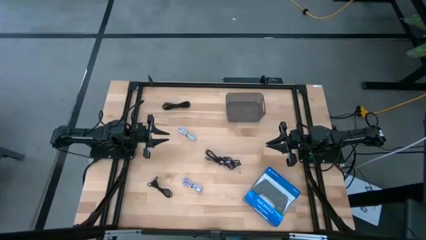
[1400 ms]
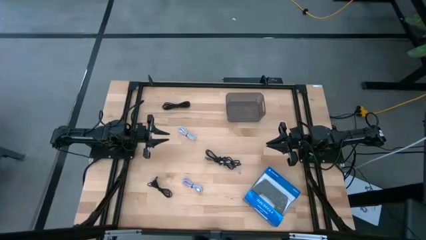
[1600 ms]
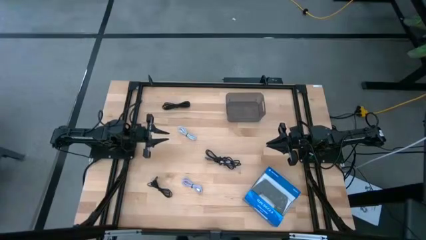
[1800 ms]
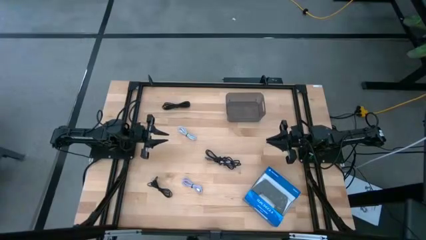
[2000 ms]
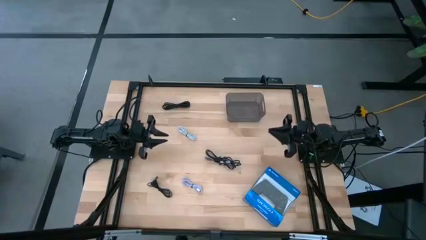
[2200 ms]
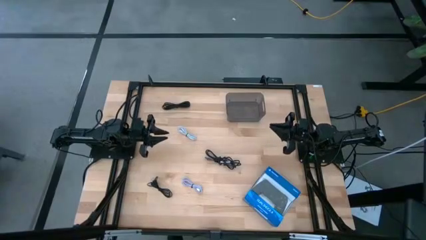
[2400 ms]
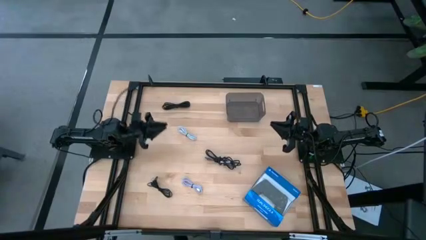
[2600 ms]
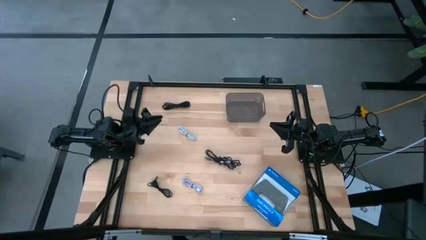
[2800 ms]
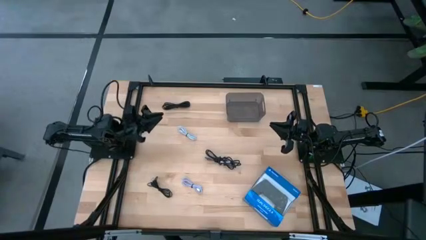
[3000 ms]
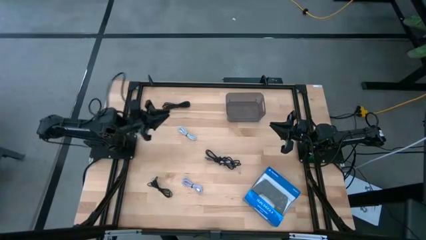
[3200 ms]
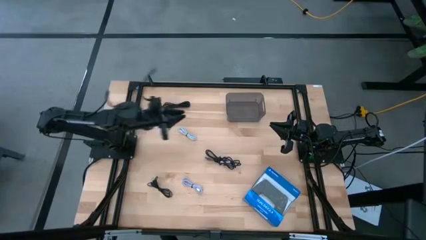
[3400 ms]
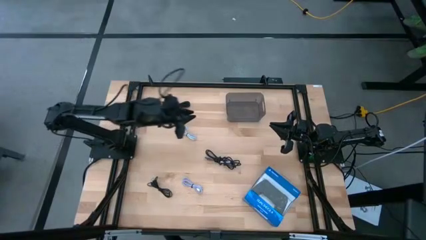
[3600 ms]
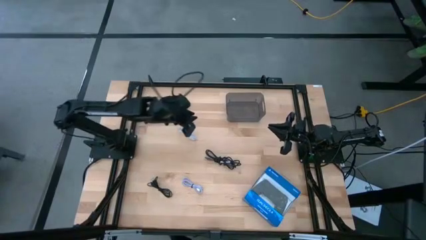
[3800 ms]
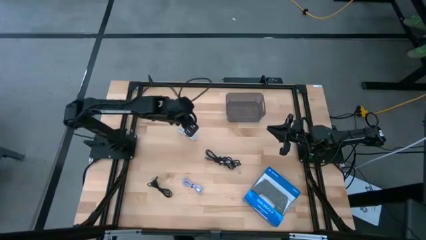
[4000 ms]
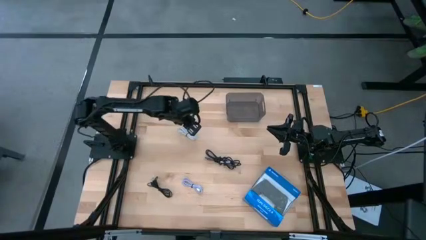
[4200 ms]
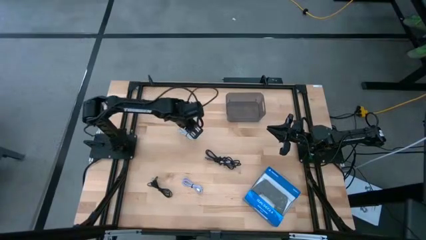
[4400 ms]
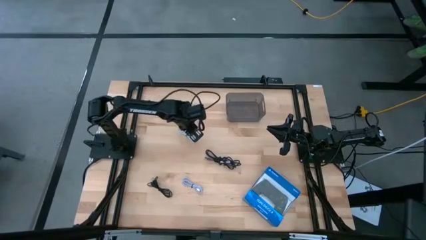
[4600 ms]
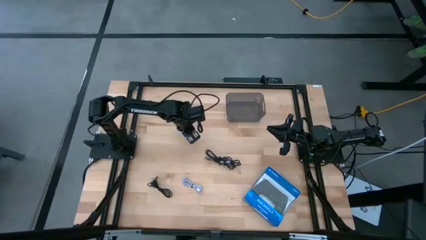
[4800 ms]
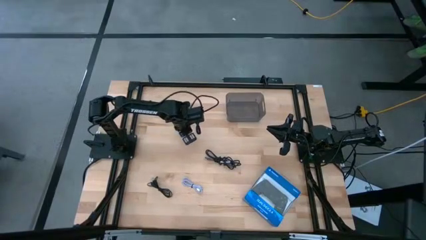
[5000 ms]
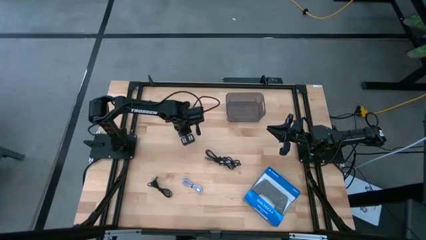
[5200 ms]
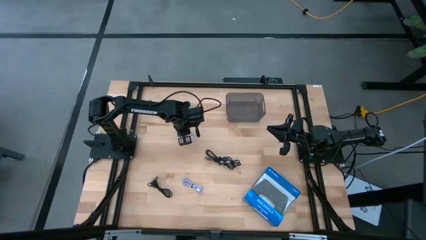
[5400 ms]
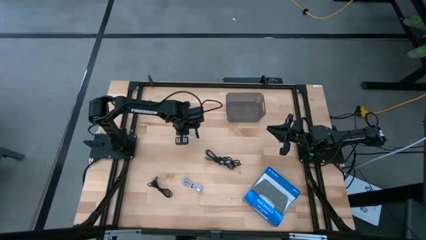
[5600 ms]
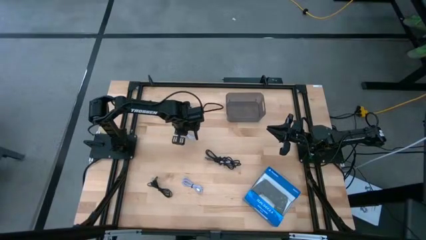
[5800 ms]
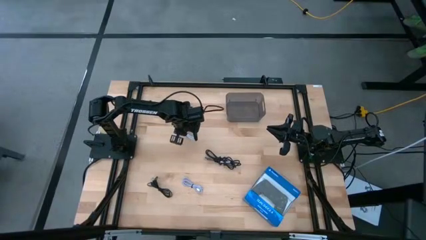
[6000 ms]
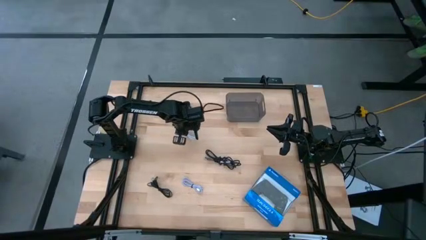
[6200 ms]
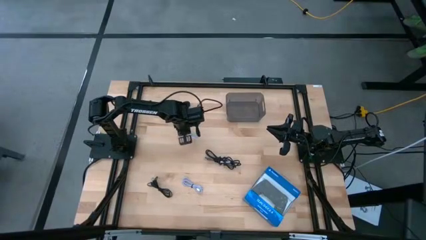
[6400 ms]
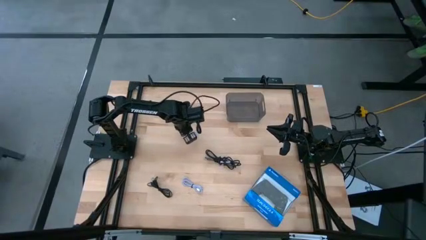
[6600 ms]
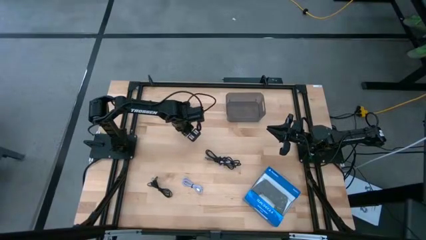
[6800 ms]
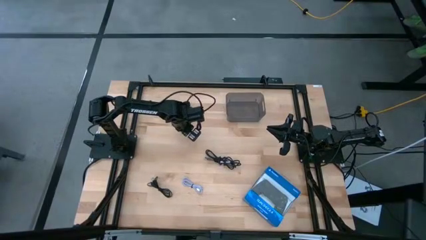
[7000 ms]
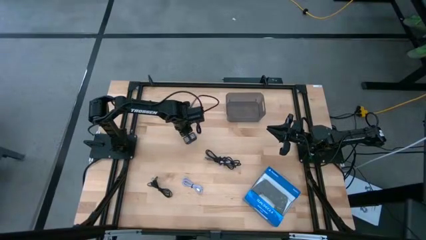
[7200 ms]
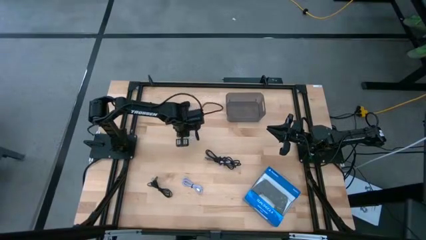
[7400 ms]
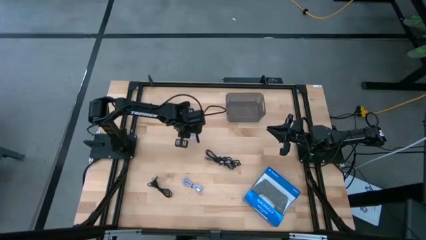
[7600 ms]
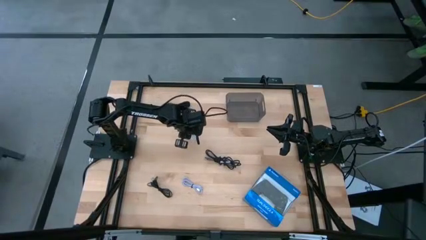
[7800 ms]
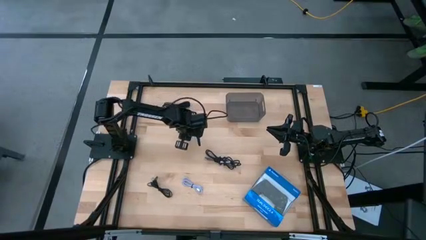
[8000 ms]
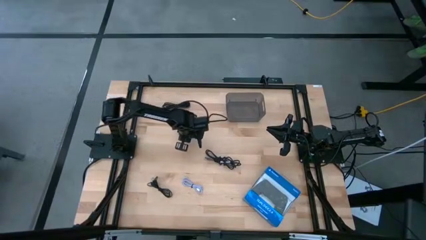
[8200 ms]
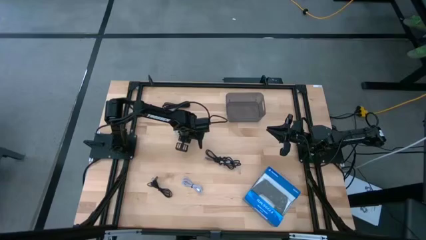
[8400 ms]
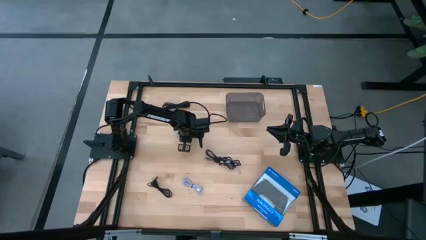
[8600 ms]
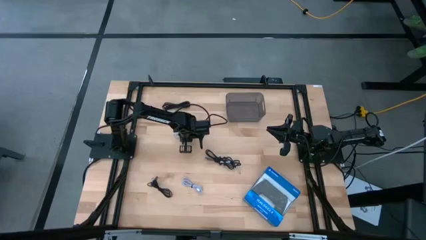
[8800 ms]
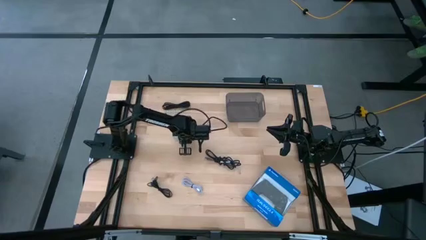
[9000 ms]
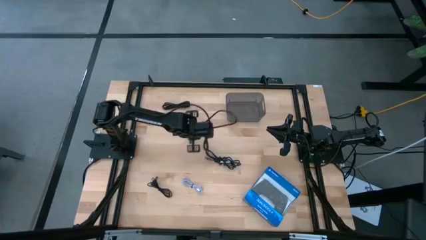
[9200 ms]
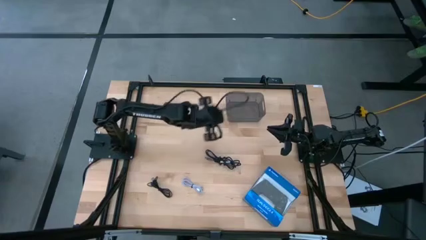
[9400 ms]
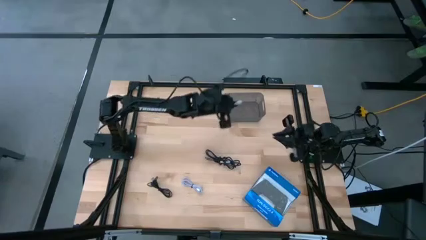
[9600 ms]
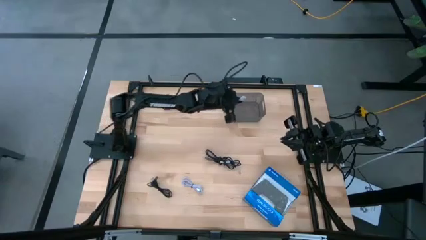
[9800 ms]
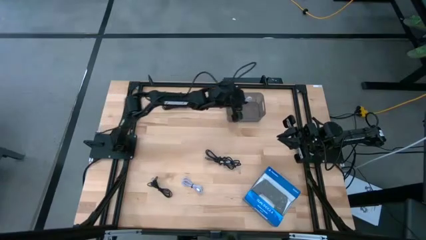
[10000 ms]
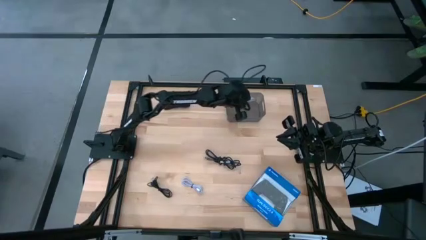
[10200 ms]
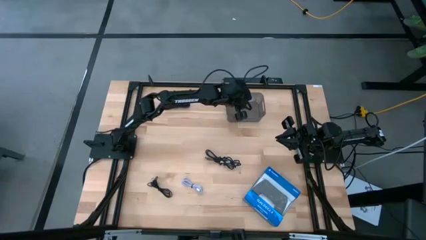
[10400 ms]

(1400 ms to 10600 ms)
Task: Pick and place USB-C Cables
Put the white charger cable into the black bin

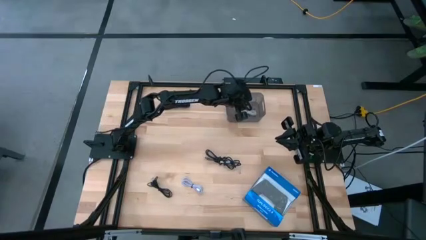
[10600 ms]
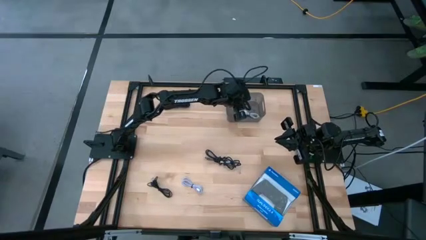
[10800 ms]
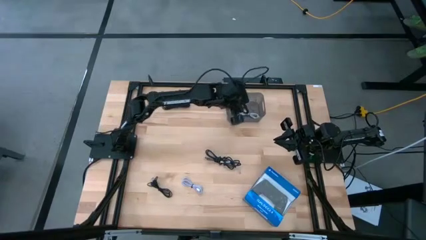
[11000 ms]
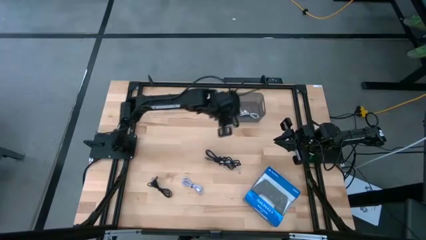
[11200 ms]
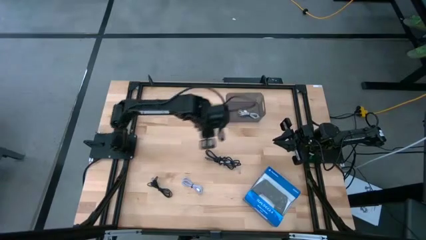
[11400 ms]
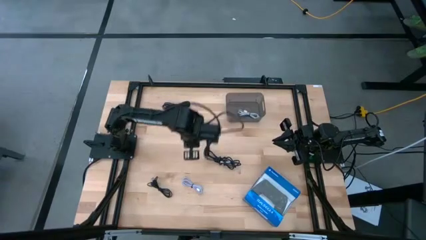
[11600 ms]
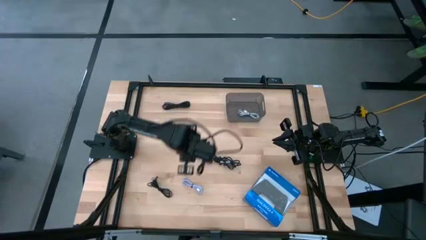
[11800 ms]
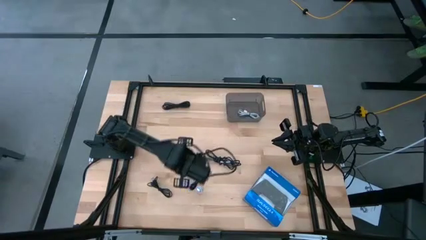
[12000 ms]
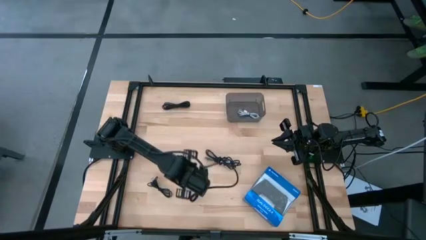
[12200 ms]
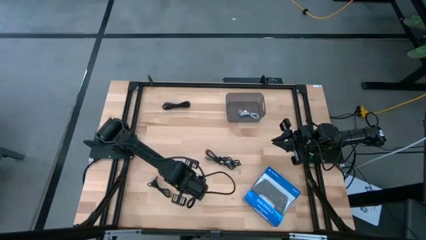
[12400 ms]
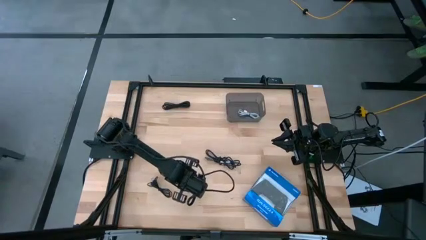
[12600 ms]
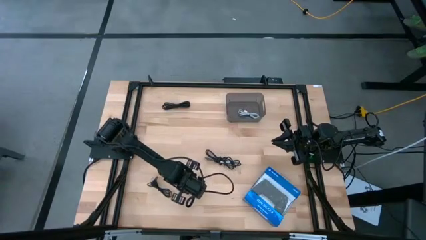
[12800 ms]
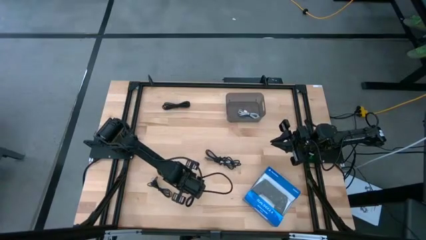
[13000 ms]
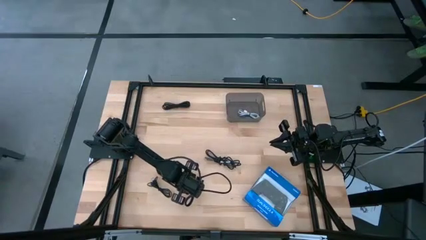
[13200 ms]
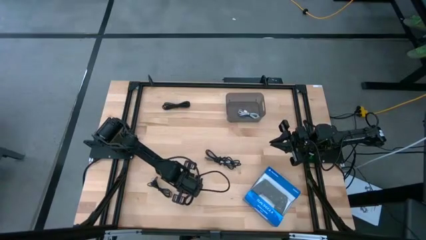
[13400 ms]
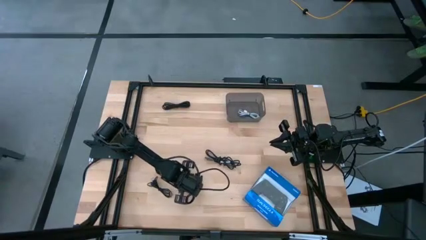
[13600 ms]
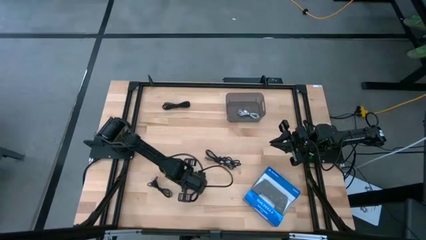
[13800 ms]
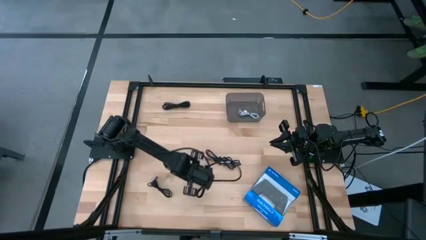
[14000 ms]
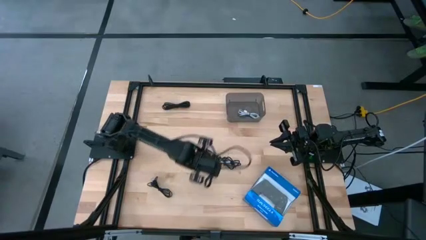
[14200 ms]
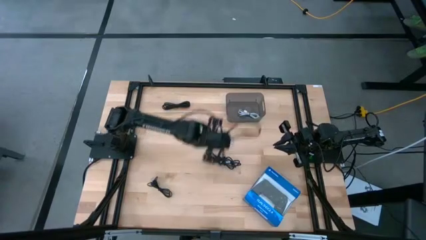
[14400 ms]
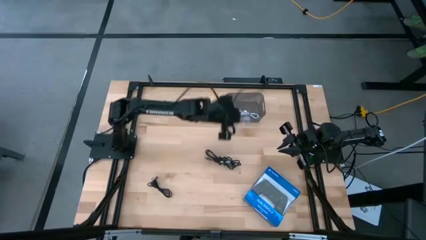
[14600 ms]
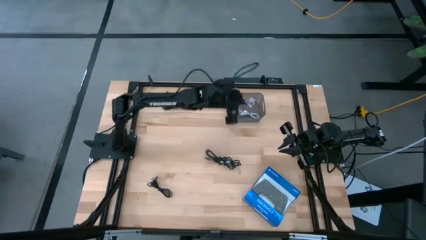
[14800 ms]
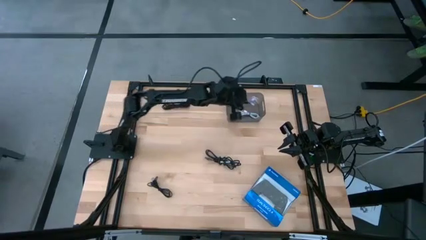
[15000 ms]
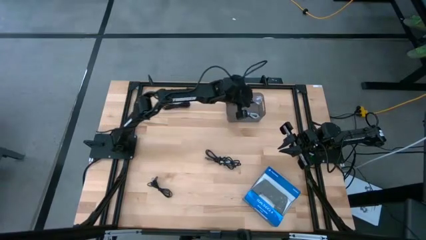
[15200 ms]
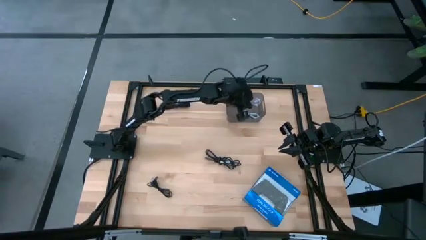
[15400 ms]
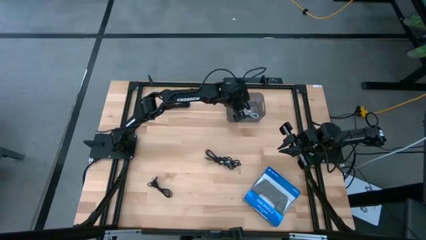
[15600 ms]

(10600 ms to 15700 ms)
Put the purple charger cable into the black bin

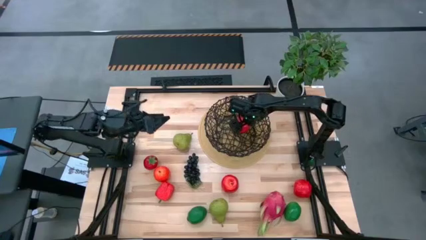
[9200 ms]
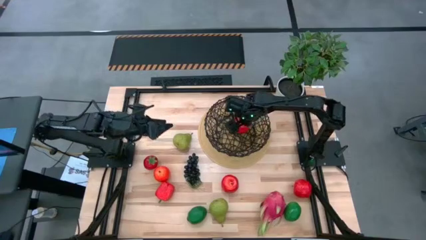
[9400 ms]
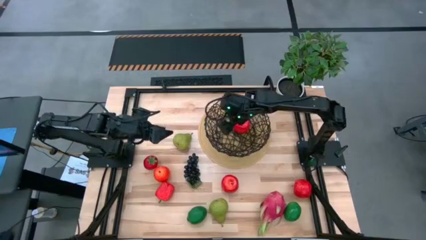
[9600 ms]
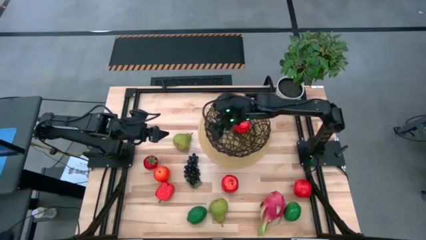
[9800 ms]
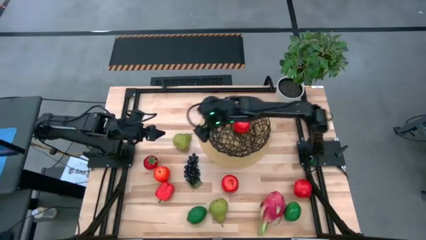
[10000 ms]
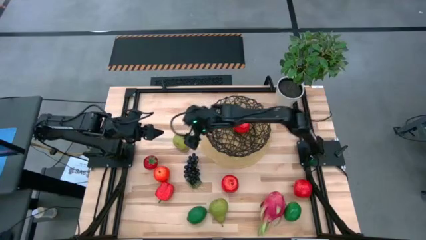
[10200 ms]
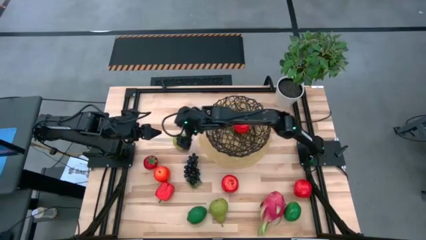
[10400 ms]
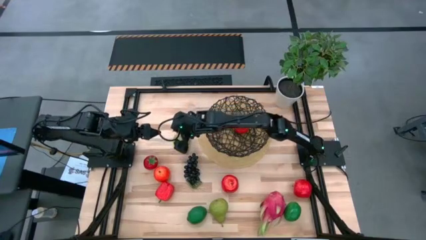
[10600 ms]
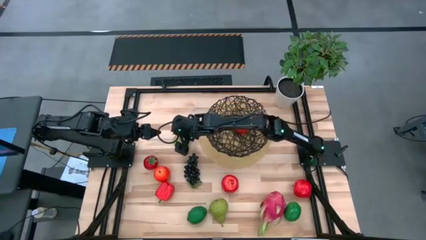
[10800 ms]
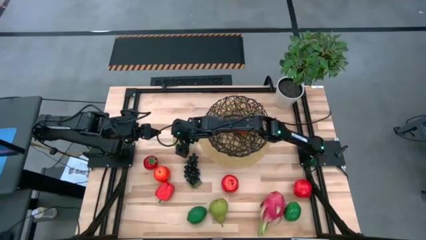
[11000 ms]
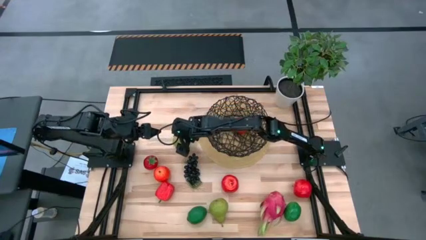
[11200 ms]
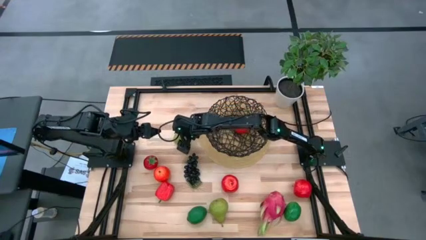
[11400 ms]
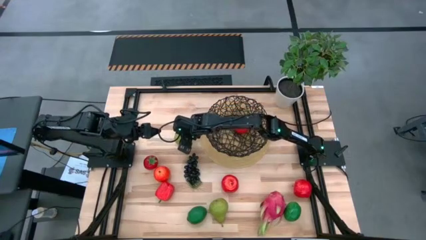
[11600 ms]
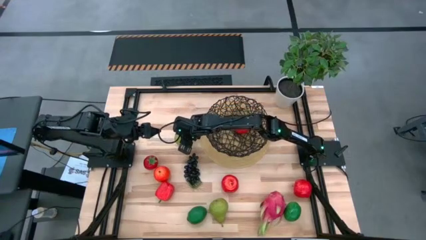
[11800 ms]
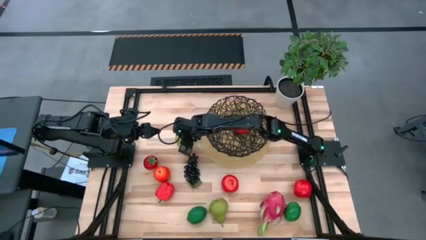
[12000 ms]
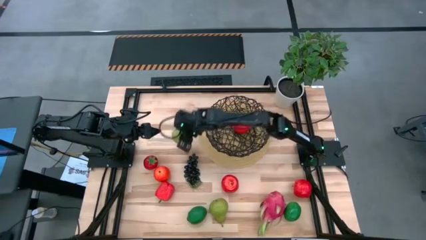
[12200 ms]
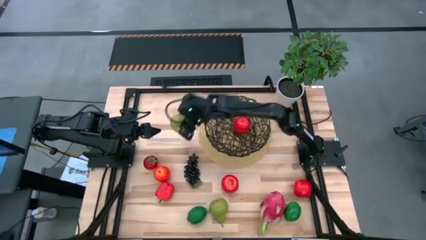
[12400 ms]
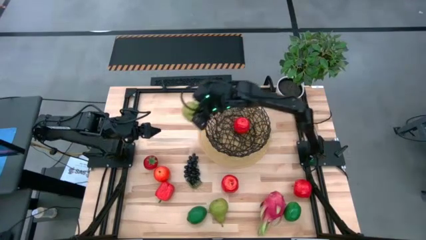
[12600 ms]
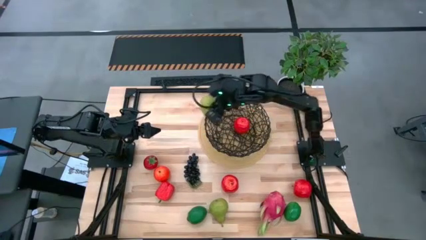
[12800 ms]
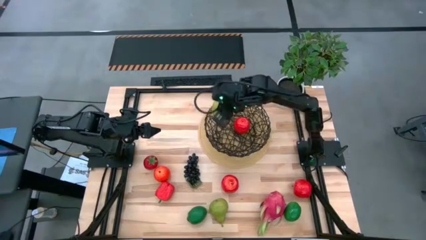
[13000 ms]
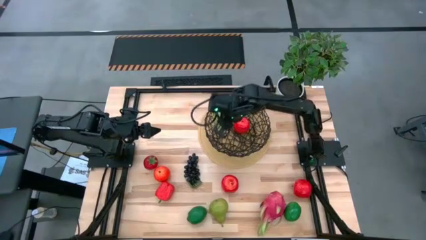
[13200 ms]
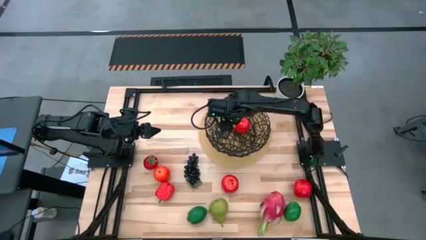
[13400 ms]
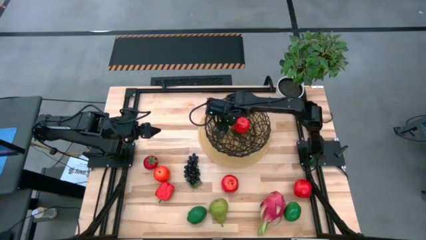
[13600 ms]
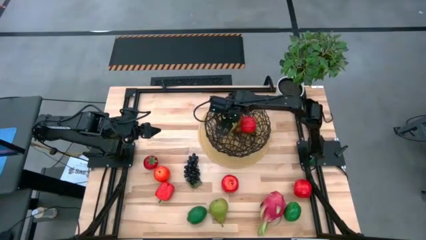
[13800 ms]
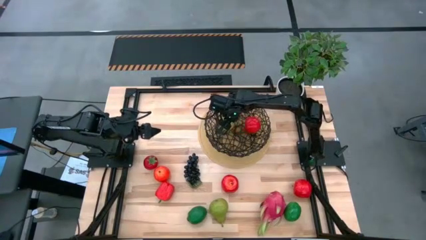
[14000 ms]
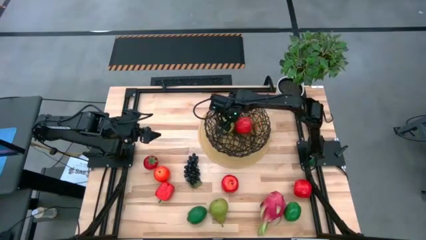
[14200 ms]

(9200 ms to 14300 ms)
Task: Build produce basket
Put the green pear into the black basket
